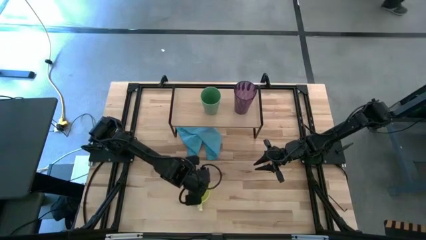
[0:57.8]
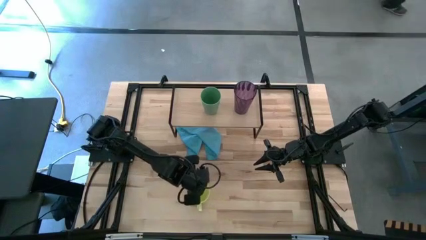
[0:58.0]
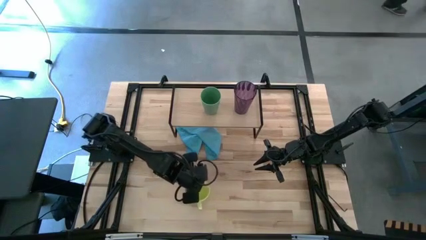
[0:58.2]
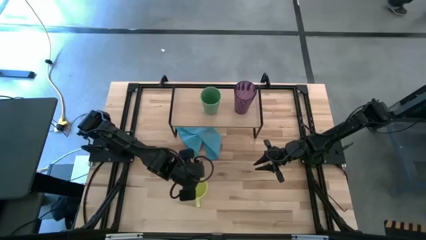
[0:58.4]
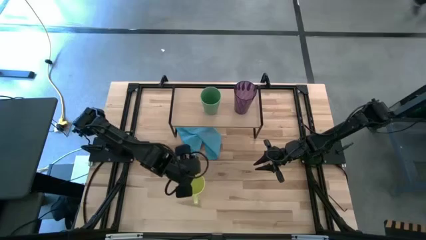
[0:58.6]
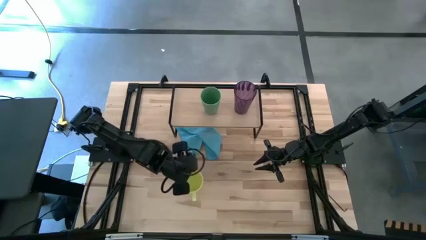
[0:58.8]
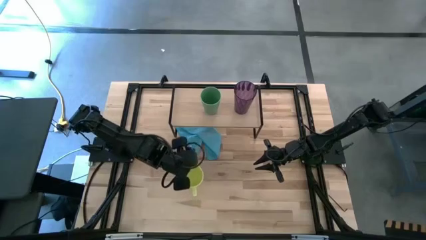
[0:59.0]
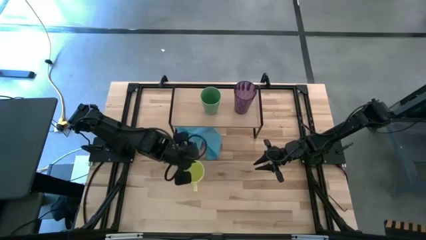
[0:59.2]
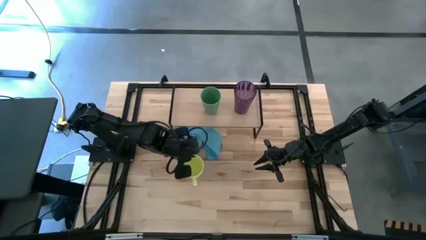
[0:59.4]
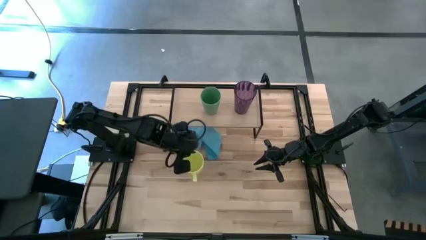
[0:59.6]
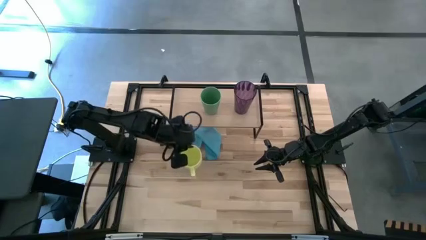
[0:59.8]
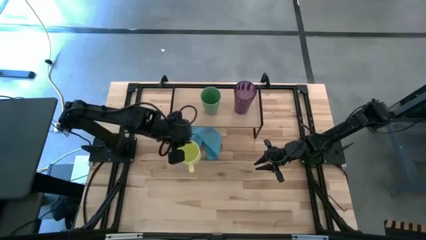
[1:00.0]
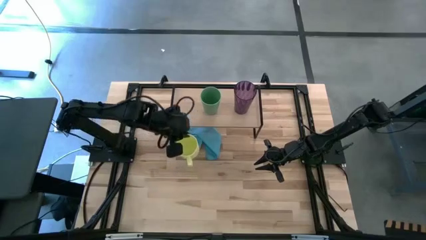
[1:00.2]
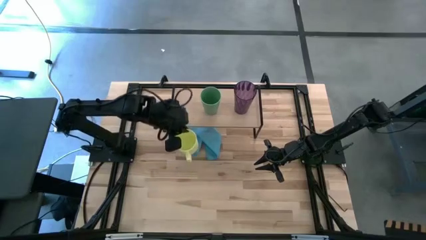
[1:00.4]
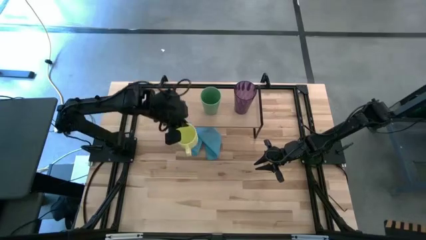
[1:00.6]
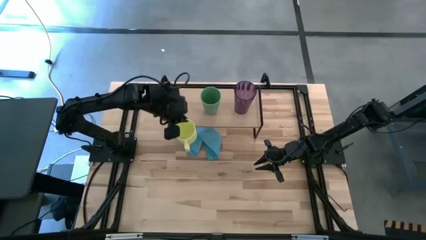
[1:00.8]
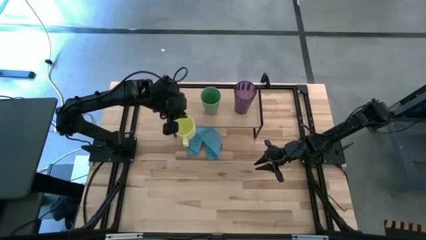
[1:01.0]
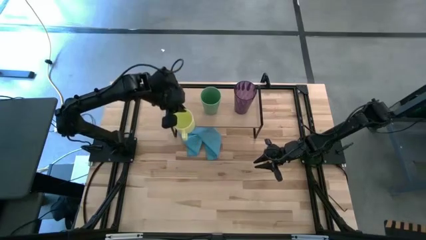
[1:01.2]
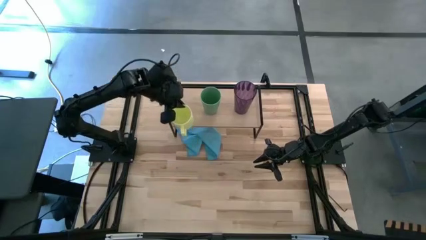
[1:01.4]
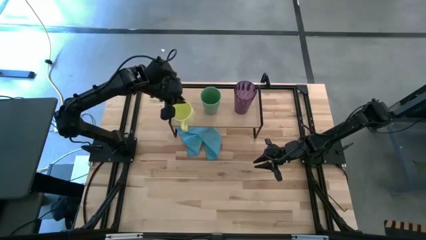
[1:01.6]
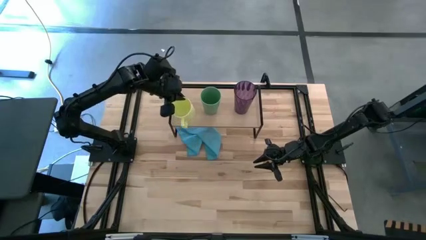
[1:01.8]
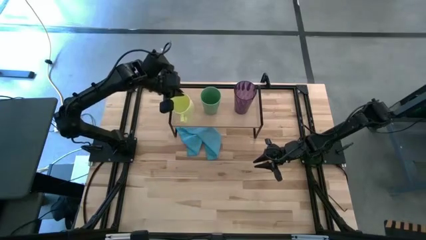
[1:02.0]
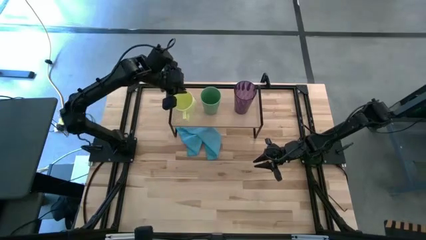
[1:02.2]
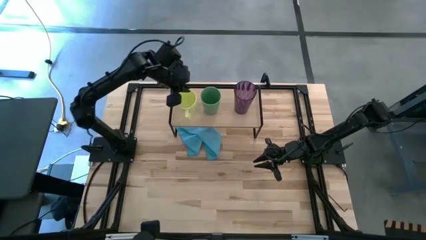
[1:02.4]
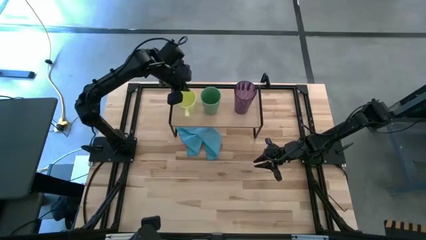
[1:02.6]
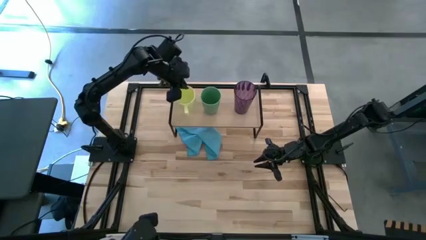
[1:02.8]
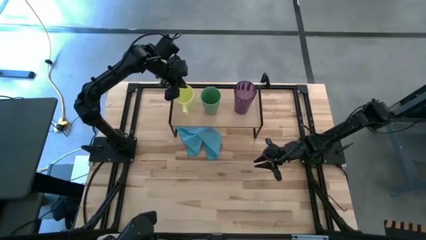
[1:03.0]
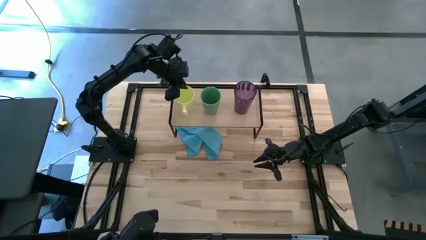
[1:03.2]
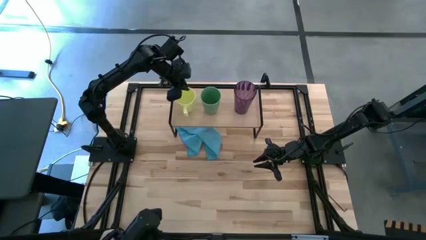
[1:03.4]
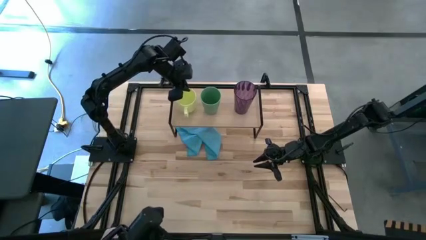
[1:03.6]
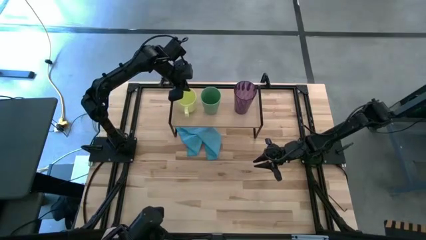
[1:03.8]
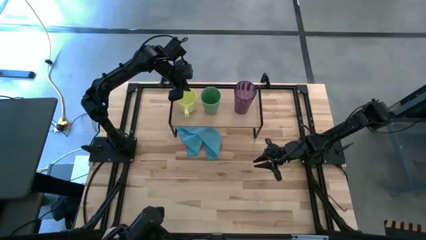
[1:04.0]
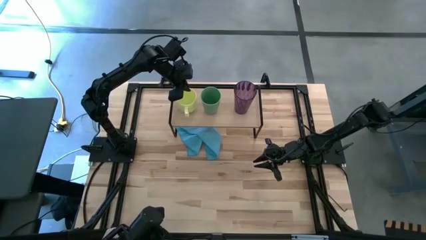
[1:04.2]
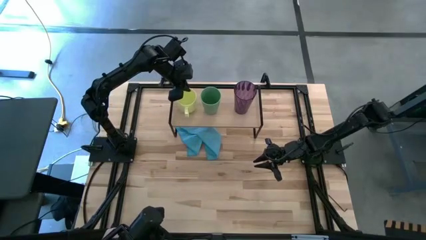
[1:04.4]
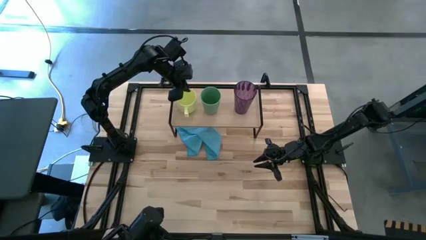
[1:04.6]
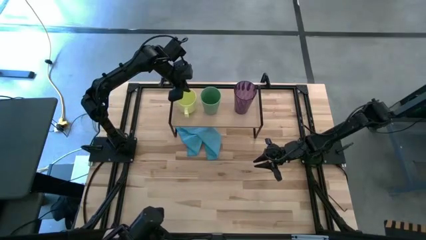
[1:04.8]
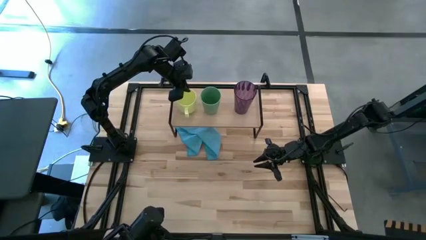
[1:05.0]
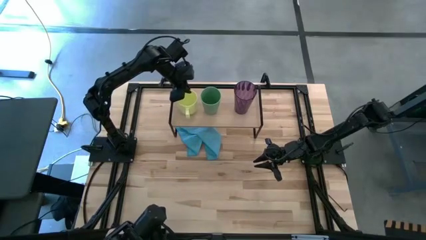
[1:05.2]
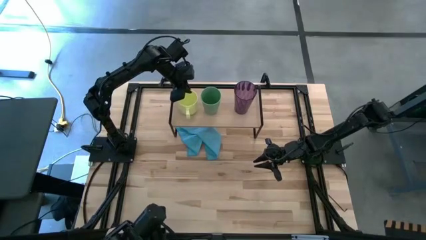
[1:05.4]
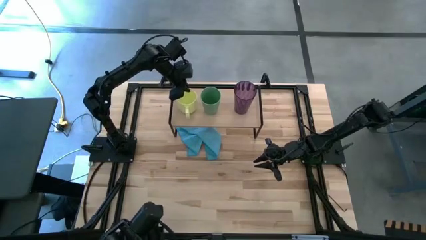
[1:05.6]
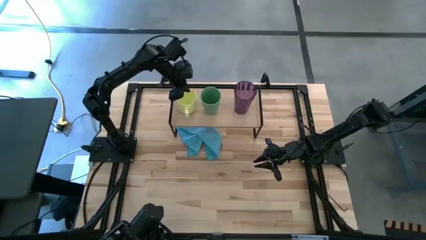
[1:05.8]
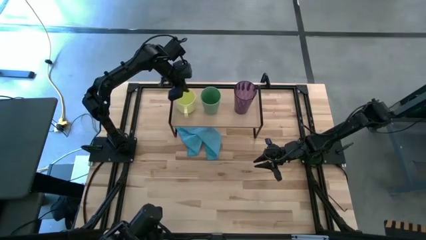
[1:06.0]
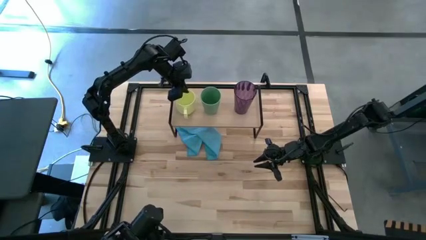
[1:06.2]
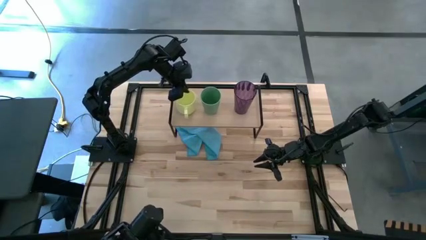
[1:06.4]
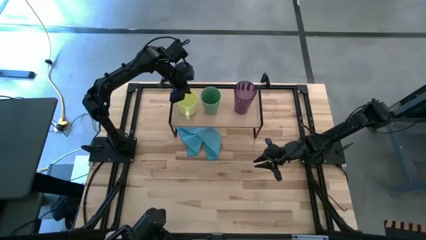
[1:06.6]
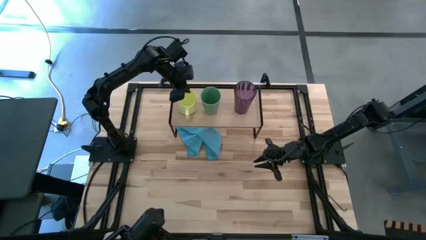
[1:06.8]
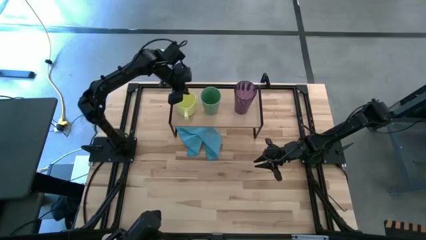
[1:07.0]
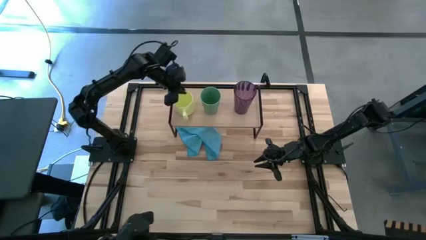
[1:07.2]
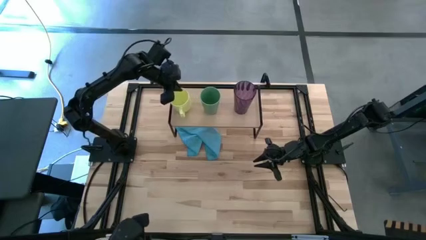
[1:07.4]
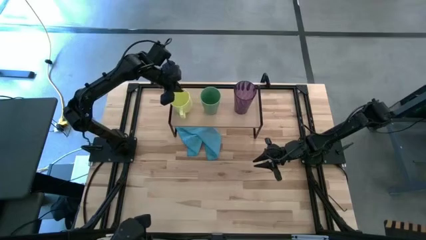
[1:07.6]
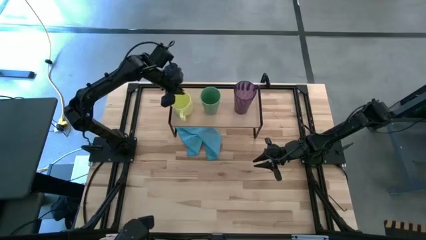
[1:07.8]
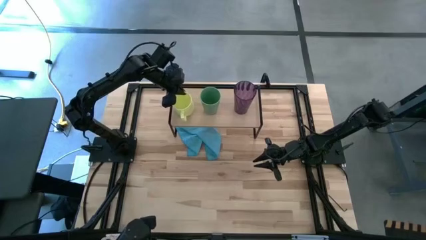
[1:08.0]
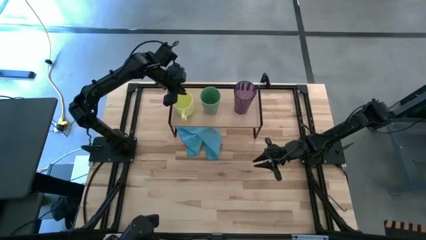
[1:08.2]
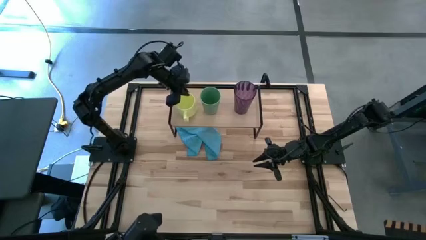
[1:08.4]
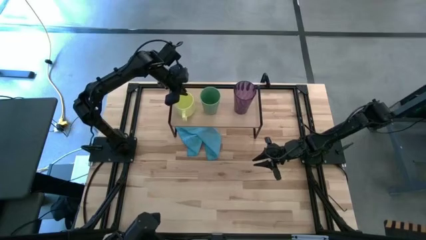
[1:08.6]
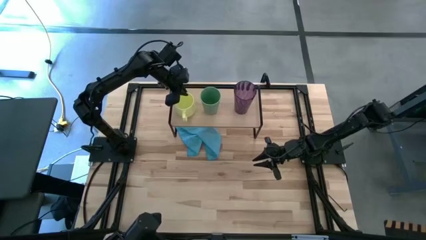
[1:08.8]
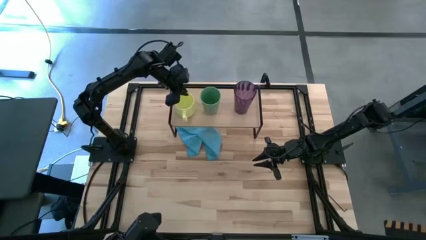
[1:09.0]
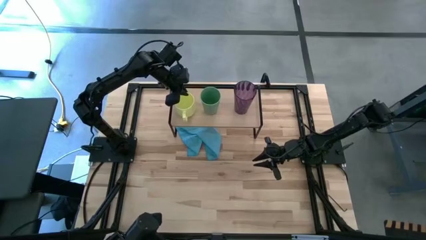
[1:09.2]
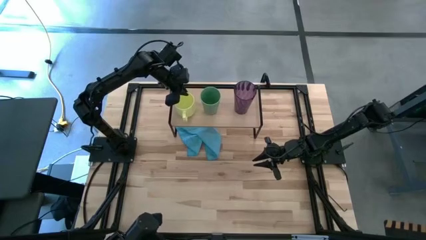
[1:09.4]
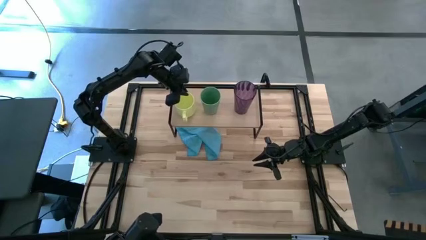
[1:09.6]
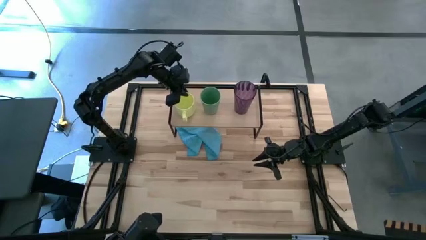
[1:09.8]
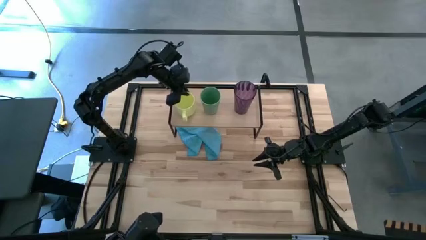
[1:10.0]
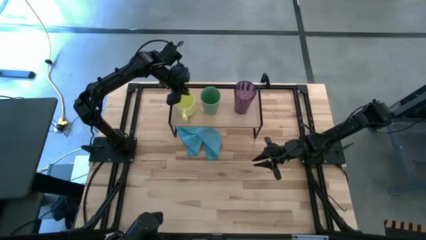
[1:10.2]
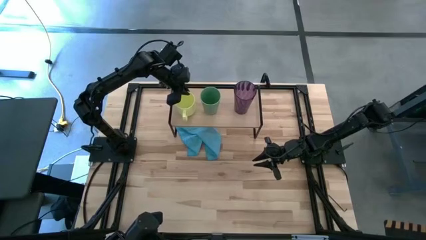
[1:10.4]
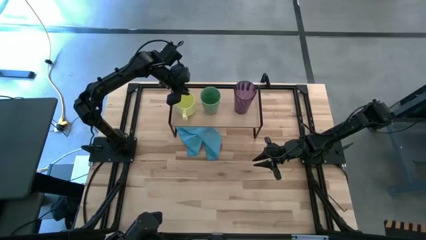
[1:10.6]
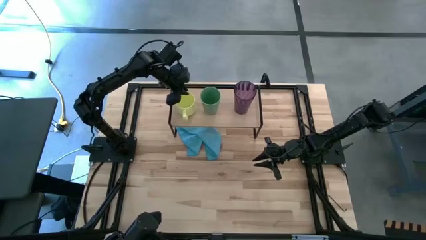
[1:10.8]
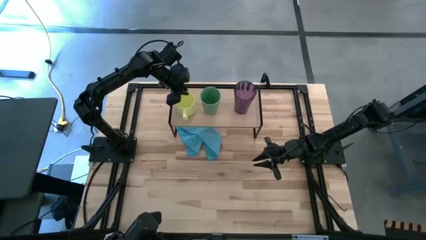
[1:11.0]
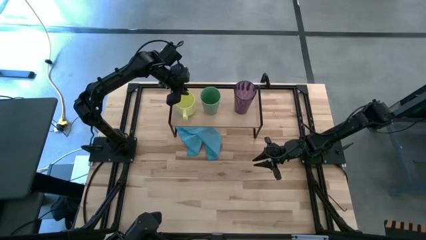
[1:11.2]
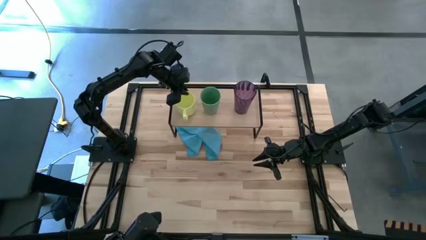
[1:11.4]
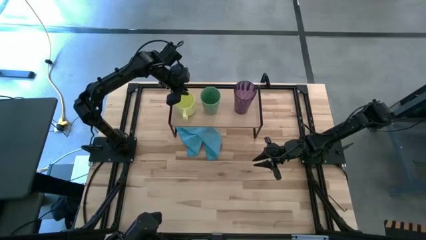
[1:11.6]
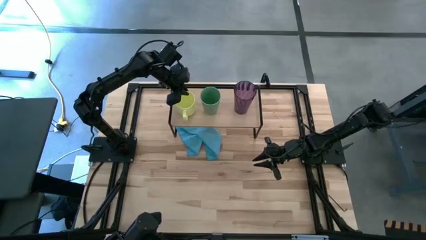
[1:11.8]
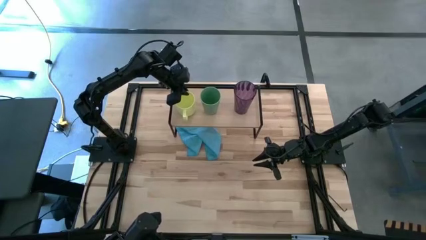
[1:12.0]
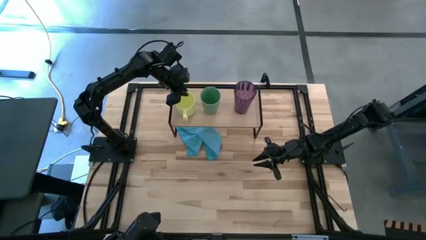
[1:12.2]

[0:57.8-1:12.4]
Task: Stack small to large cups/mugs on shelf
Put the yellow cup on the shelf

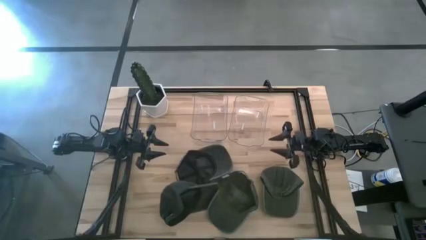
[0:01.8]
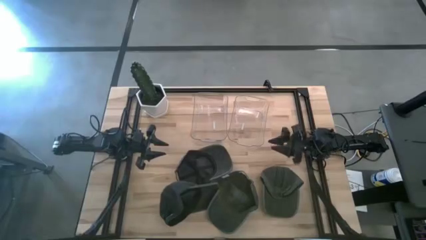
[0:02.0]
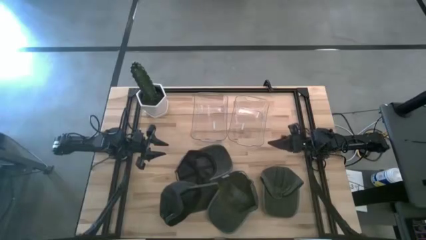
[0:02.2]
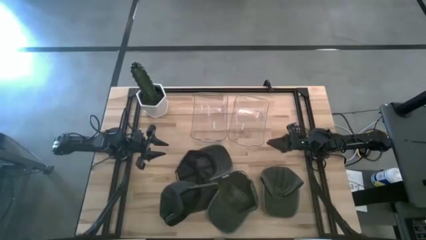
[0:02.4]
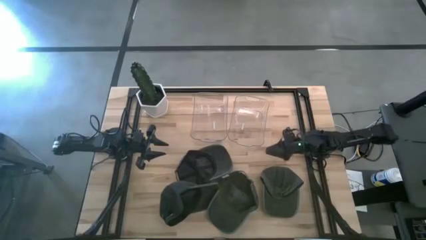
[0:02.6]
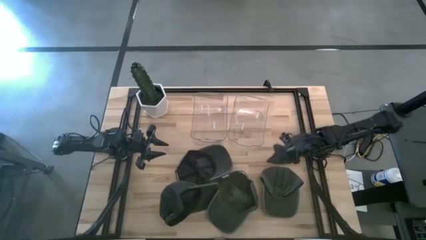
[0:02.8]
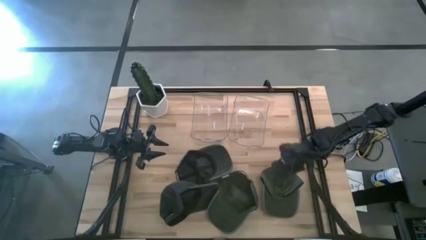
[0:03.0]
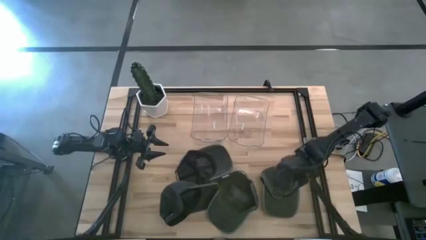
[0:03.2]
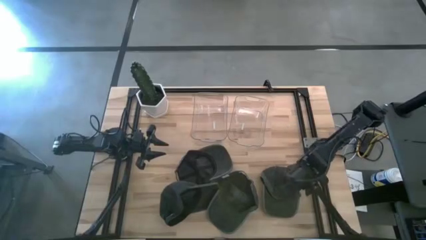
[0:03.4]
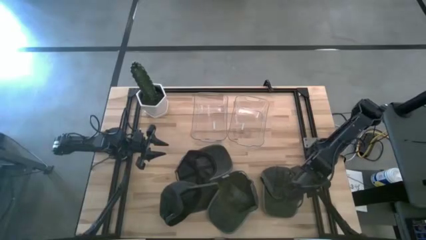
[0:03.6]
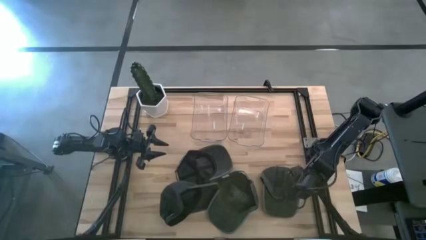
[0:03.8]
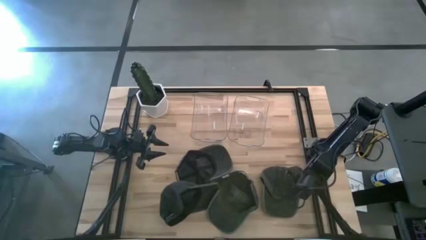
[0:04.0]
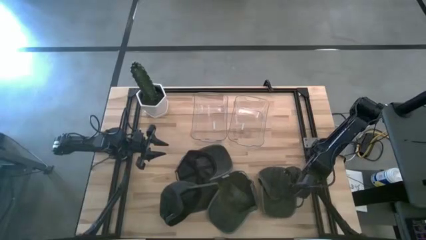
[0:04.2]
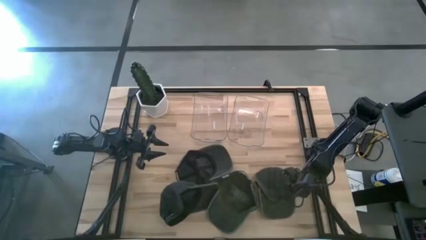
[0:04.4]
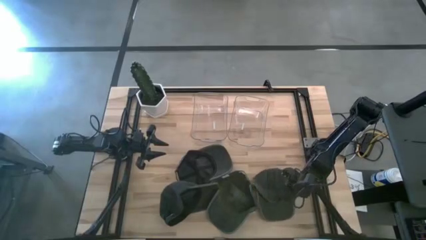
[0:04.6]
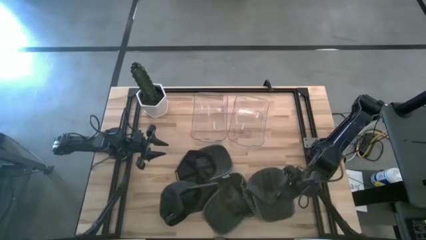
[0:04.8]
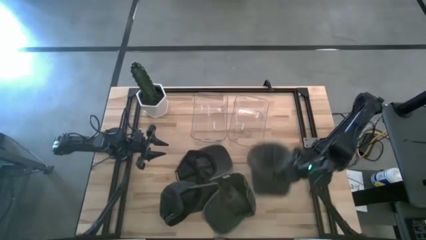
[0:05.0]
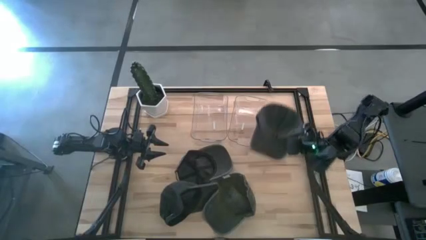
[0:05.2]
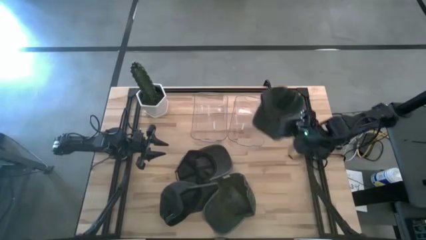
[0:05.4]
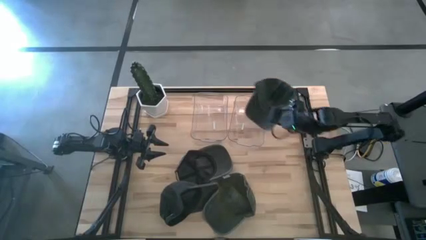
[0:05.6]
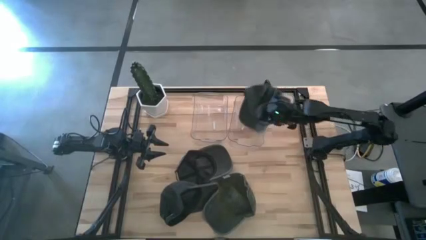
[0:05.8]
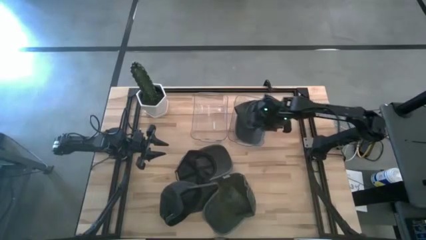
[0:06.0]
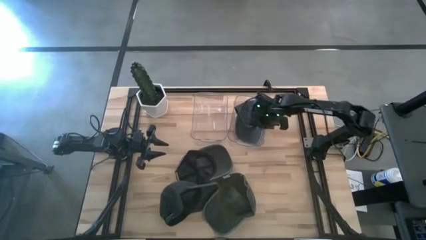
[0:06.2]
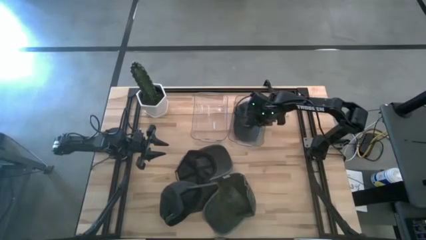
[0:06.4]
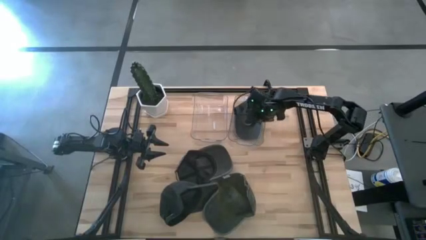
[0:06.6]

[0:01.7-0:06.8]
Task: Pick & Place hat
Put the left dark green cap into the right transparent bin
